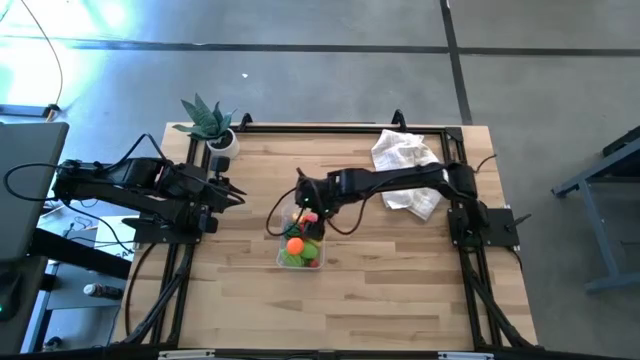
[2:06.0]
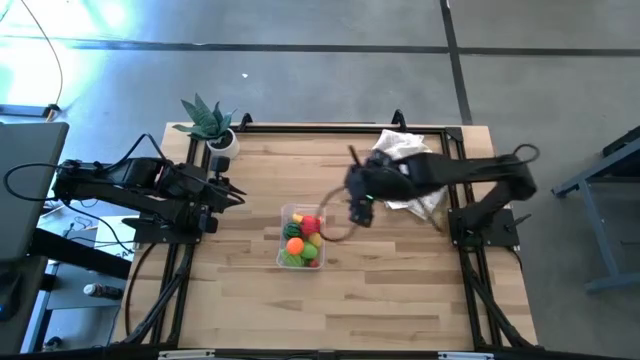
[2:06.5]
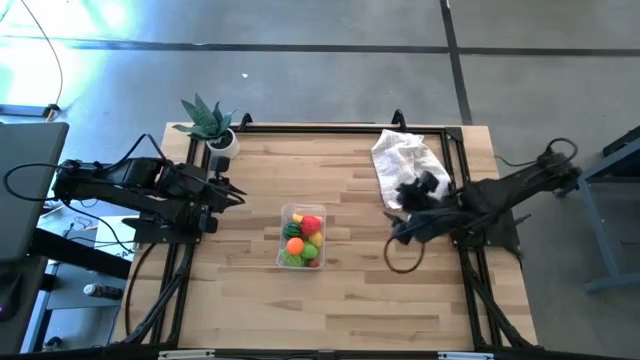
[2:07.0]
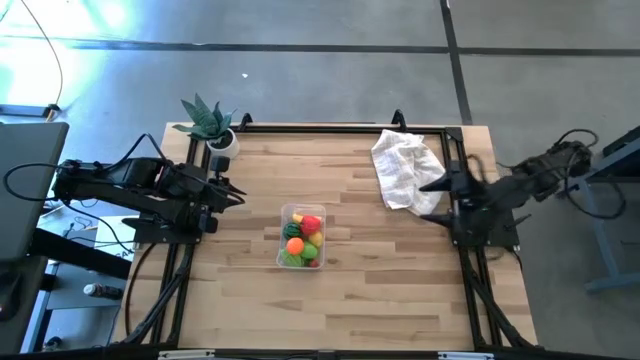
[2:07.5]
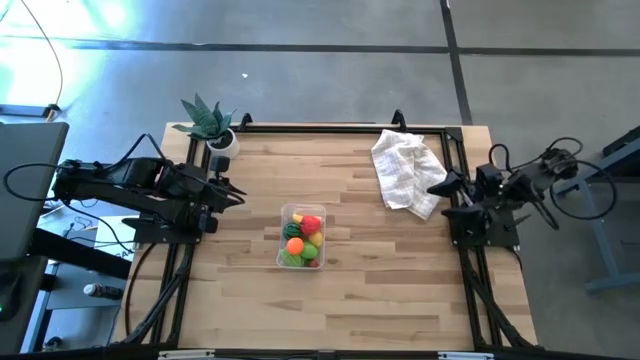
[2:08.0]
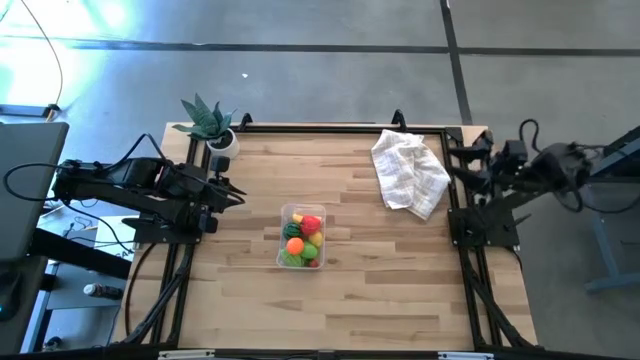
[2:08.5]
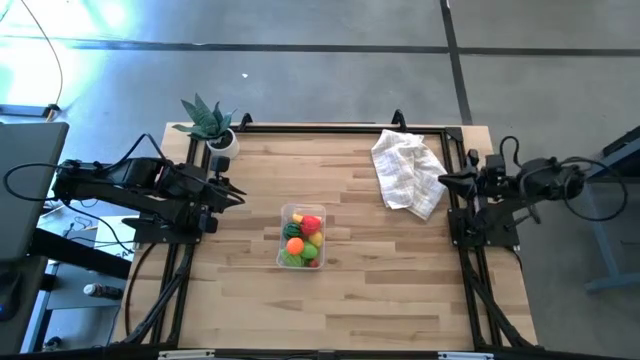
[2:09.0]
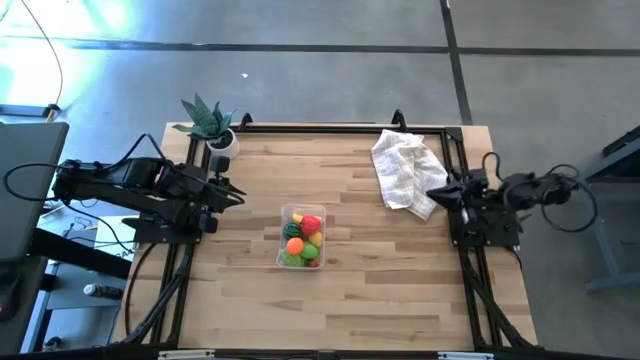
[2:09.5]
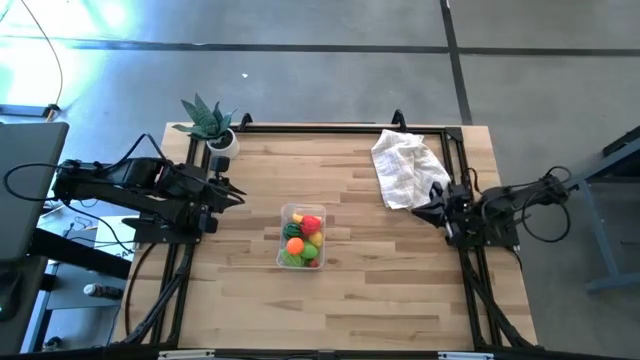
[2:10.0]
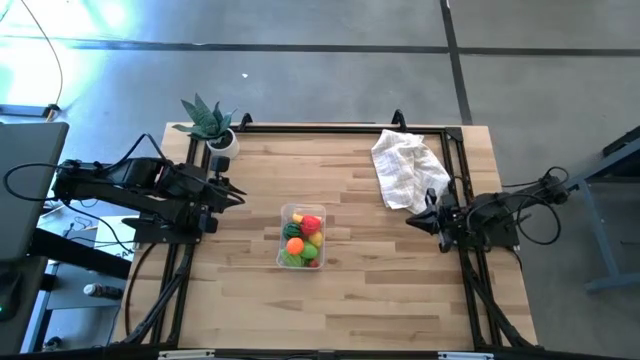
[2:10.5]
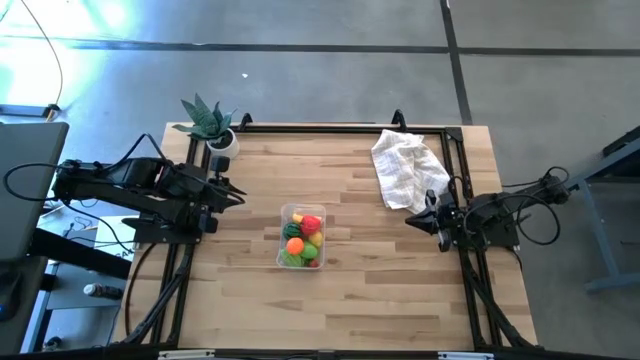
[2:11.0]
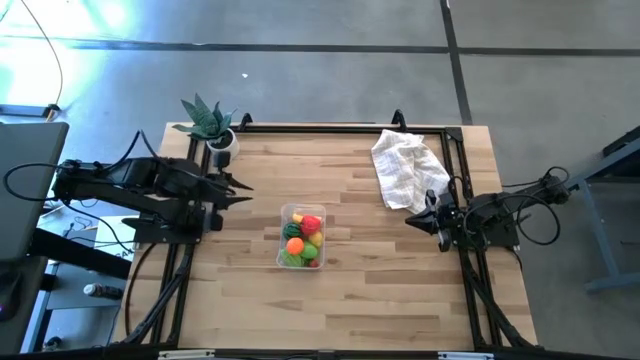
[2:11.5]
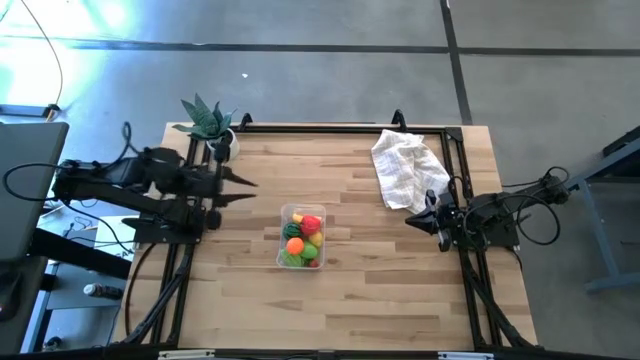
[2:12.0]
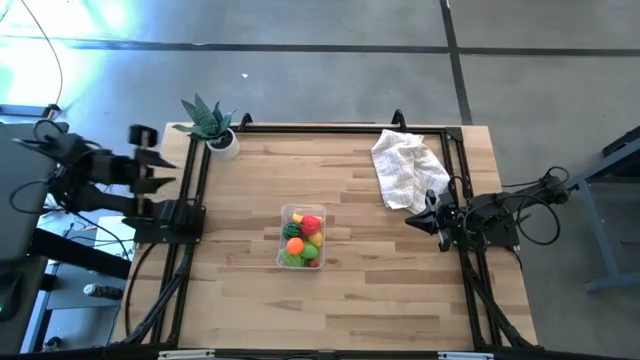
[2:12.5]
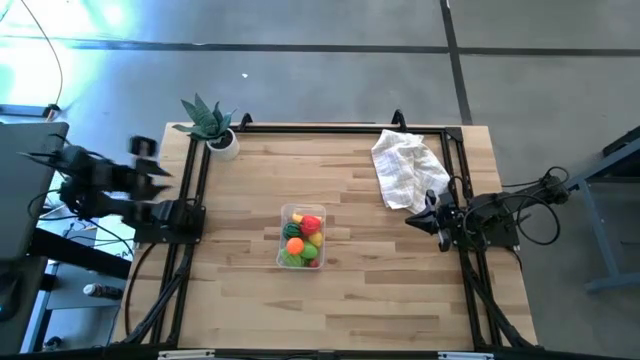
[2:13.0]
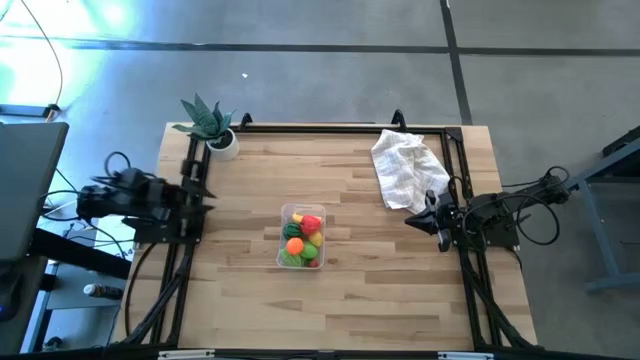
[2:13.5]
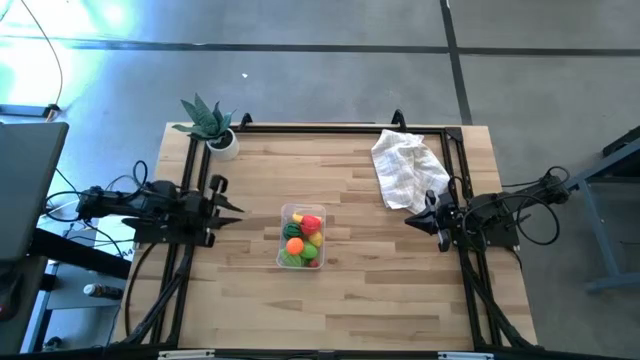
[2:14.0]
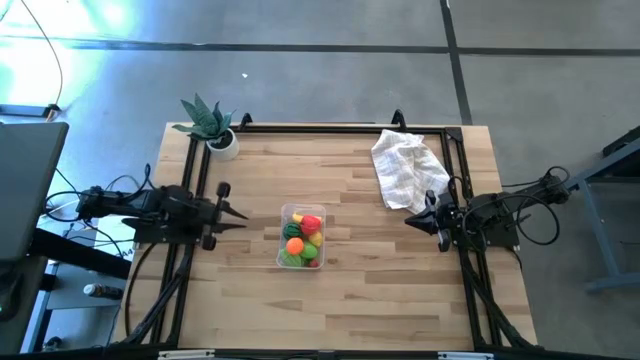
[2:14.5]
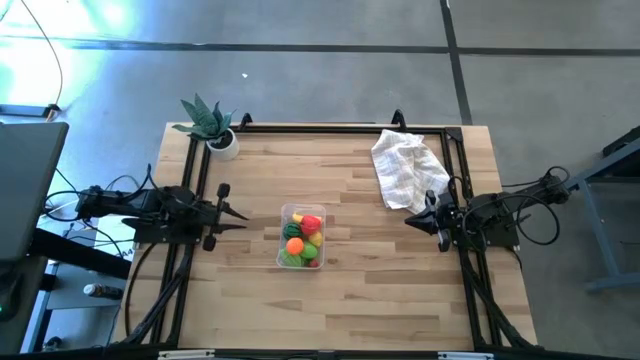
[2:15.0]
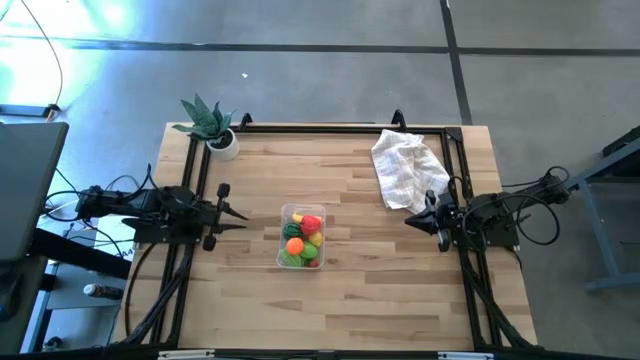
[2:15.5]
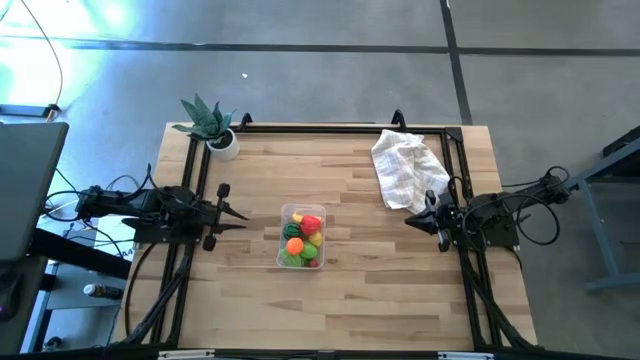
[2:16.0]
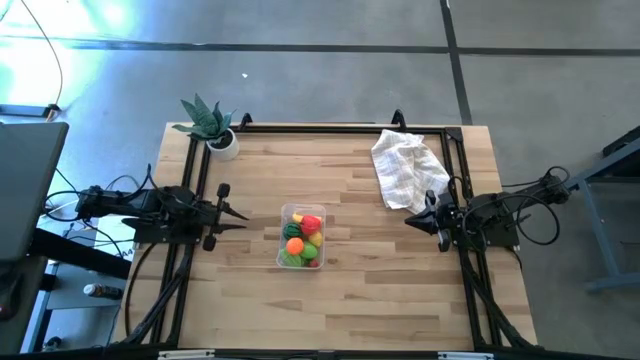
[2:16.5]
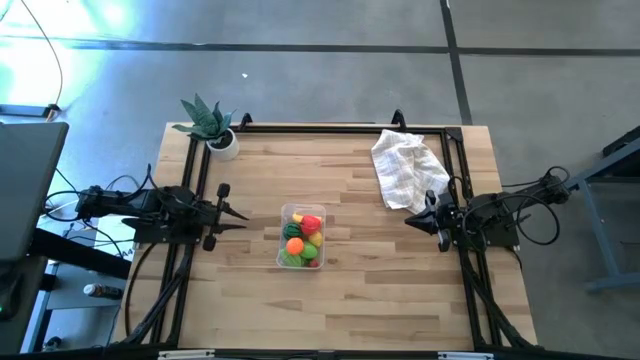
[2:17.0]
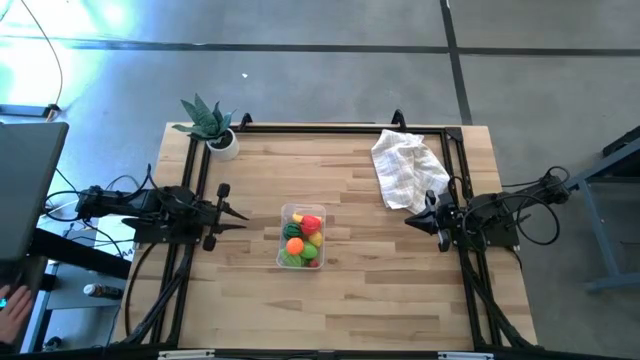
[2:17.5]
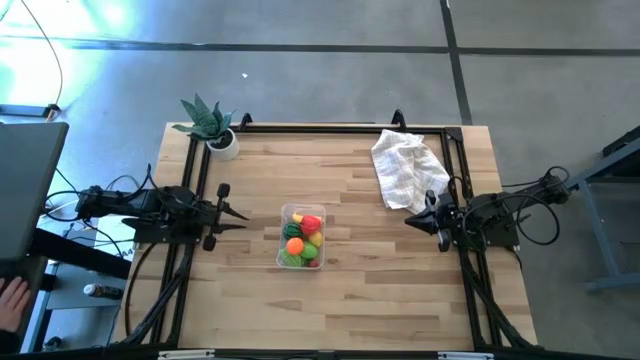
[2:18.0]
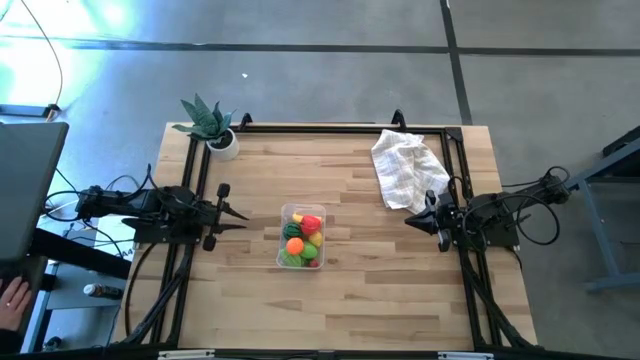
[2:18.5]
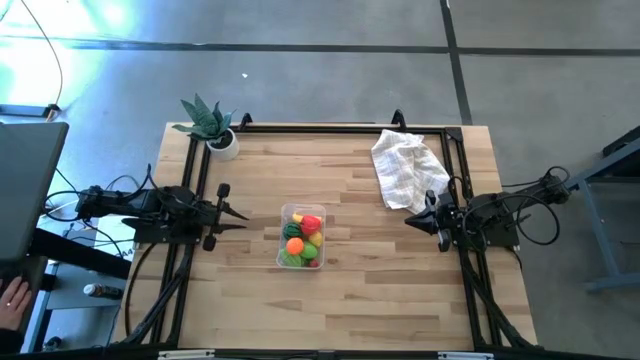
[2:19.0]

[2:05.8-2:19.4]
Task: Pick and placing Produce into tupperware
Return to Home Position

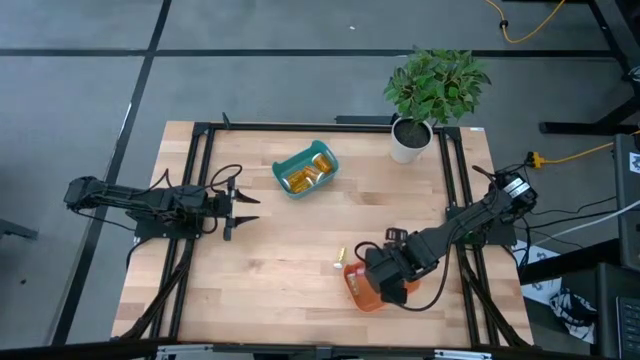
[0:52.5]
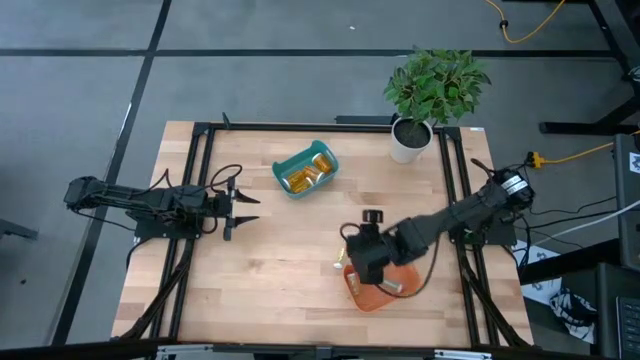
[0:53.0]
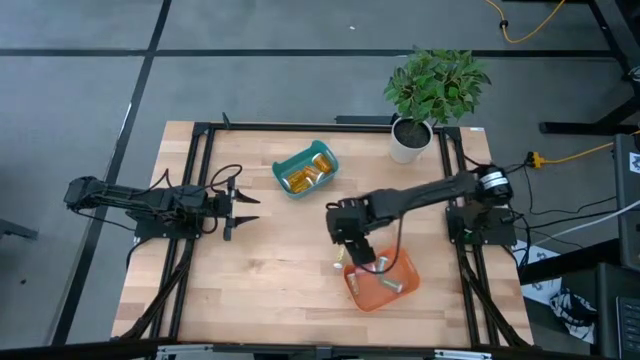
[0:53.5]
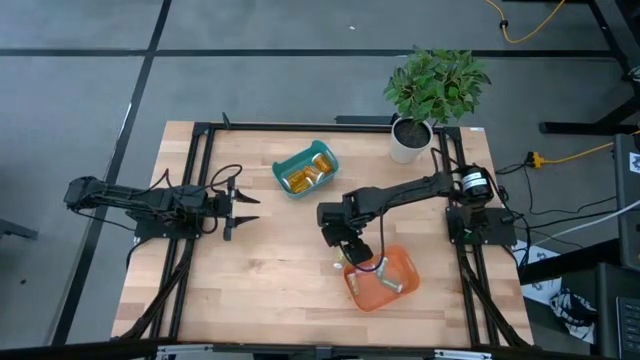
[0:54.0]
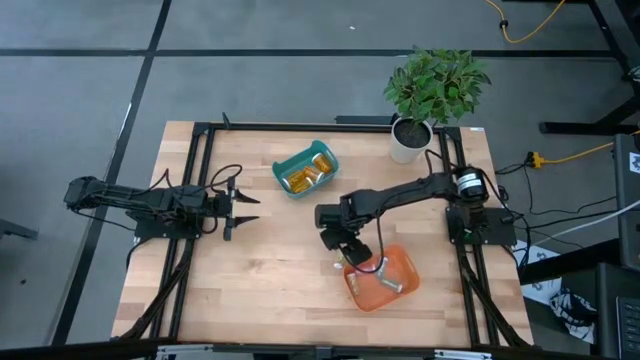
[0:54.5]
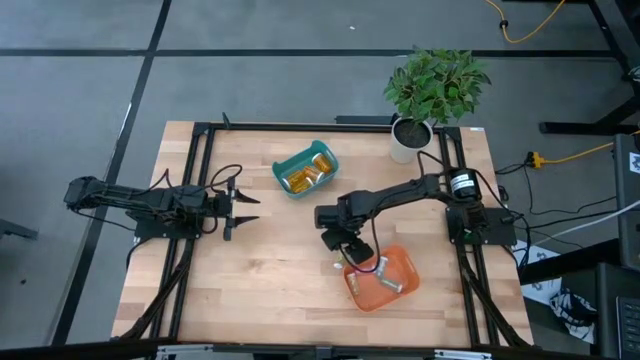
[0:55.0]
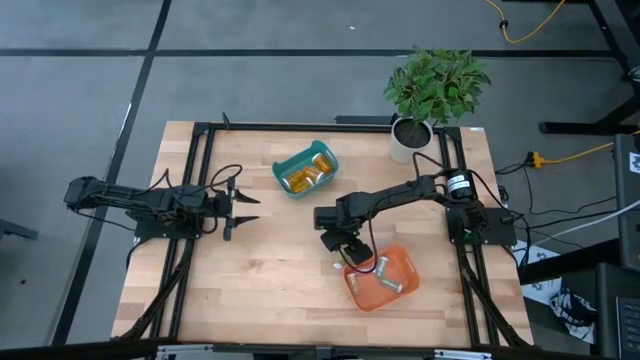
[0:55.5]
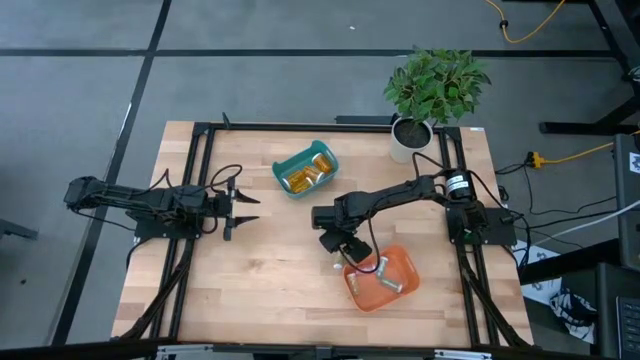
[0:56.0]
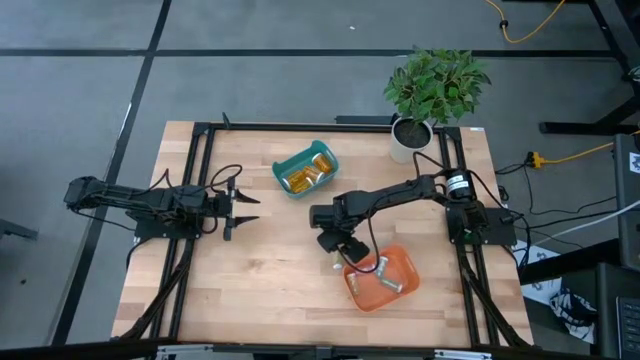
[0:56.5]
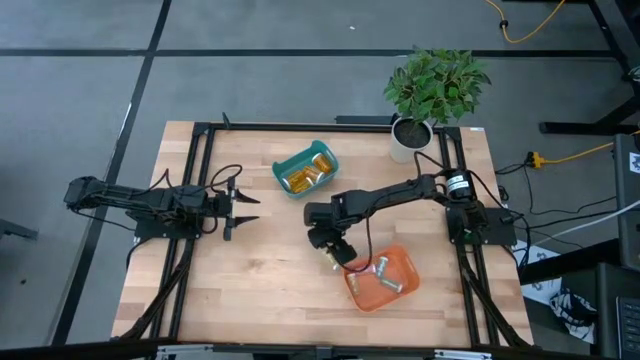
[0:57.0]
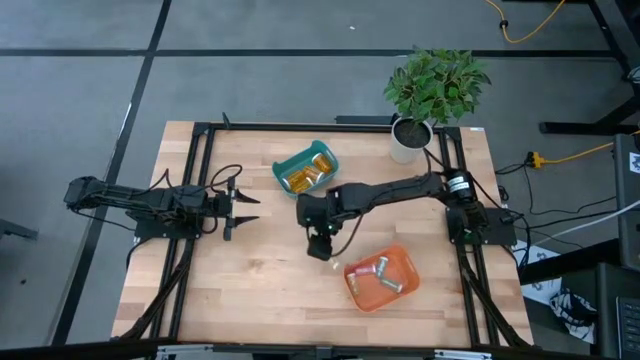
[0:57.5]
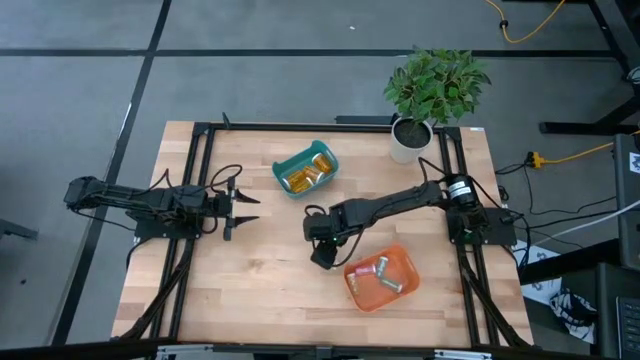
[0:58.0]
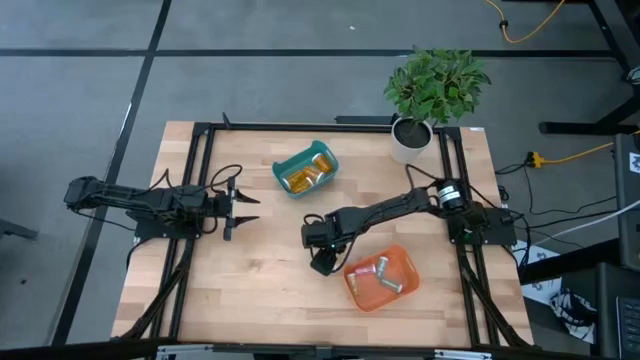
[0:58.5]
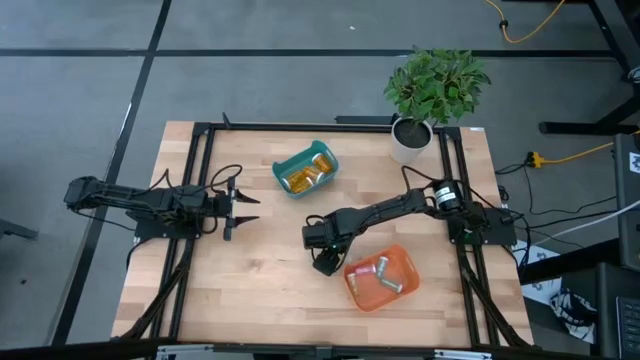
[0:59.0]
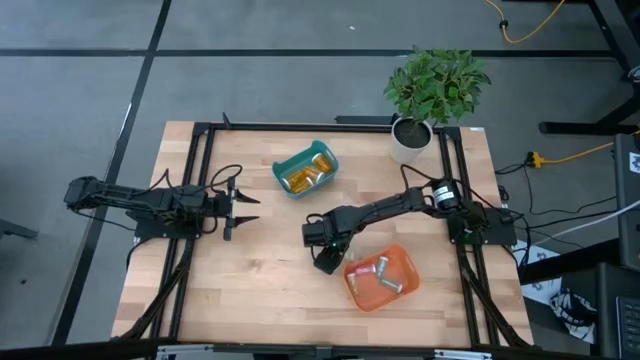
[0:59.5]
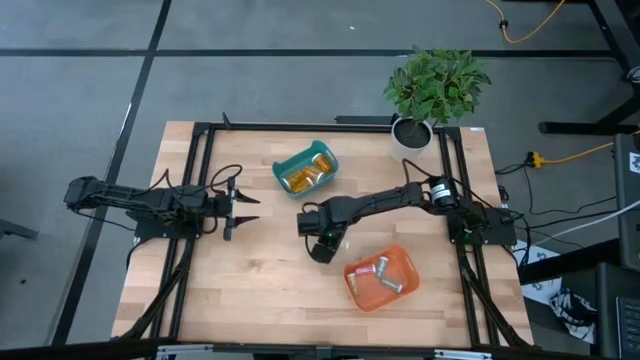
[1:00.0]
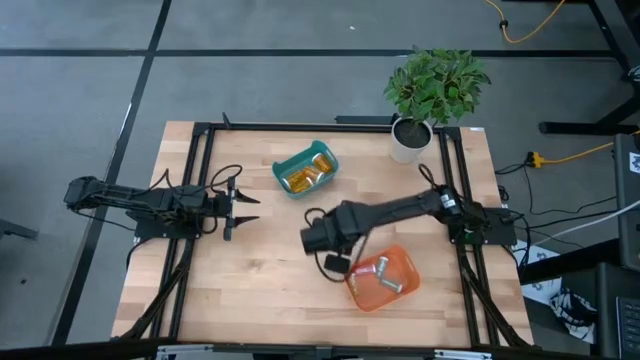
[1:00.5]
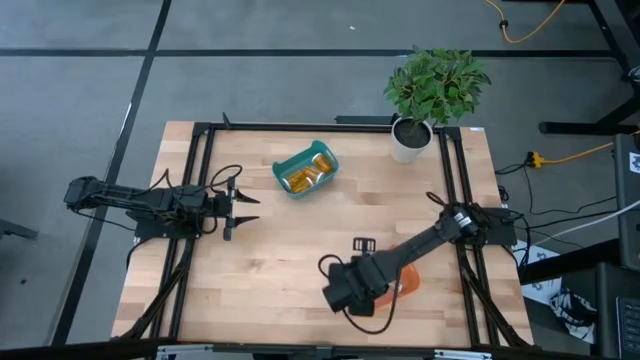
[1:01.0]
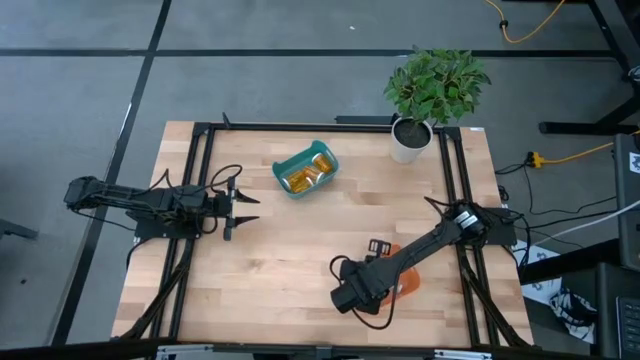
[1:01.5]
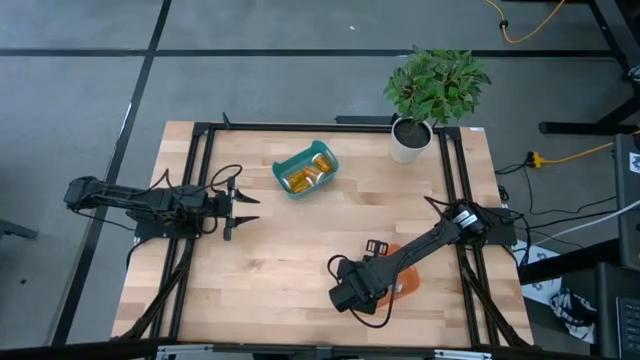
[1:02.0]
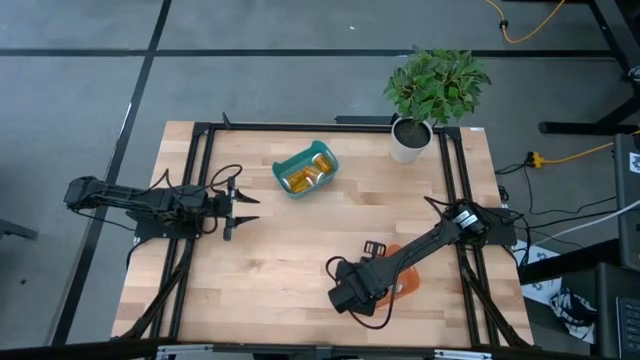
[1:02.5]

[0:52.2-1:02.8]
Task: Pick and place medicine bottles into bin by pill shape (circle, oval)
Put the small yellow pill bottle into the orange bin
